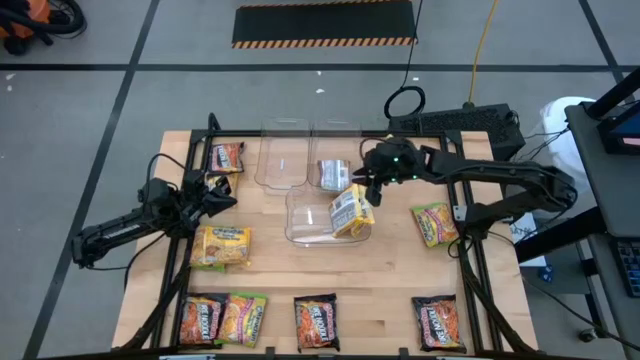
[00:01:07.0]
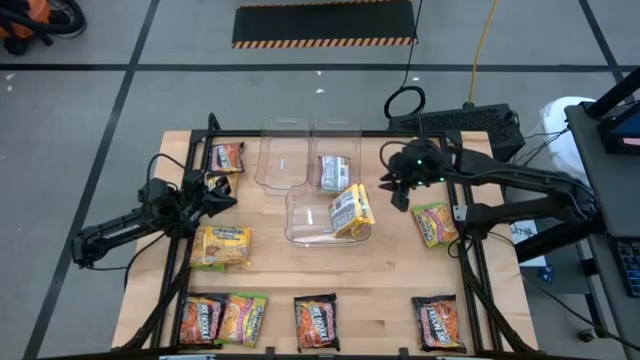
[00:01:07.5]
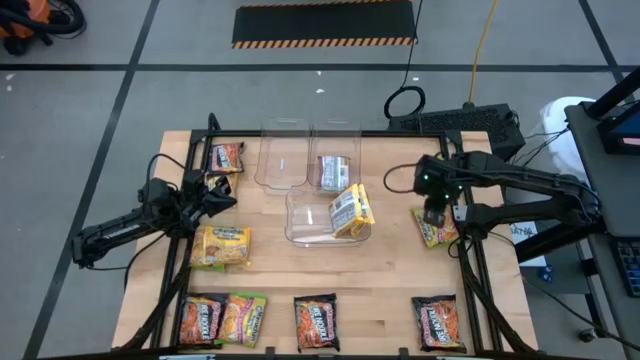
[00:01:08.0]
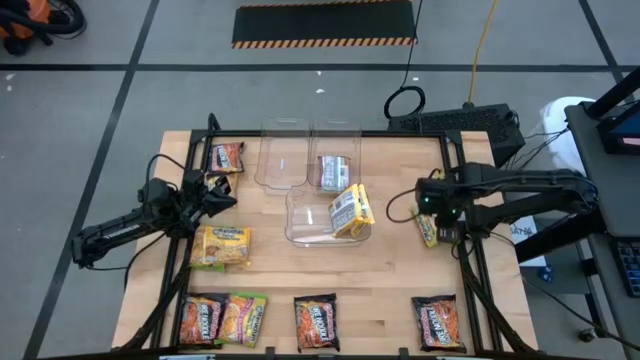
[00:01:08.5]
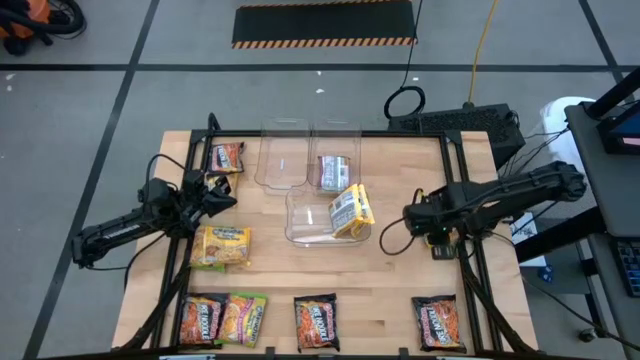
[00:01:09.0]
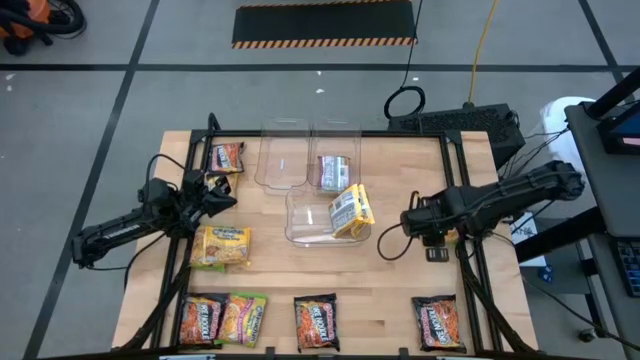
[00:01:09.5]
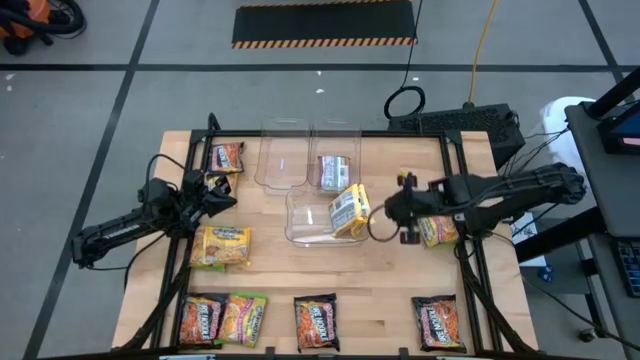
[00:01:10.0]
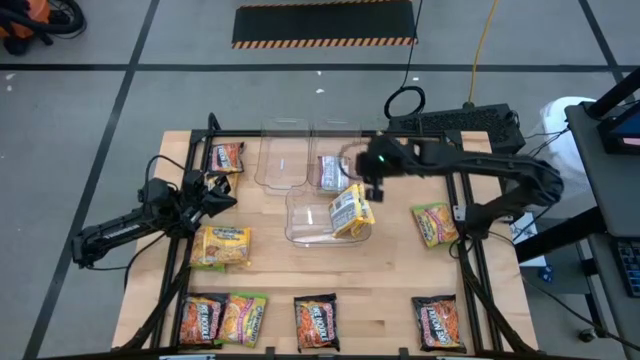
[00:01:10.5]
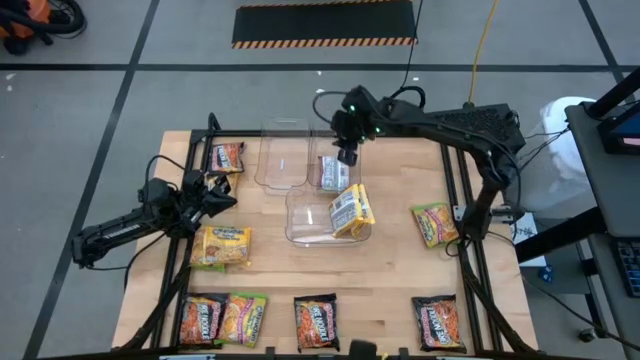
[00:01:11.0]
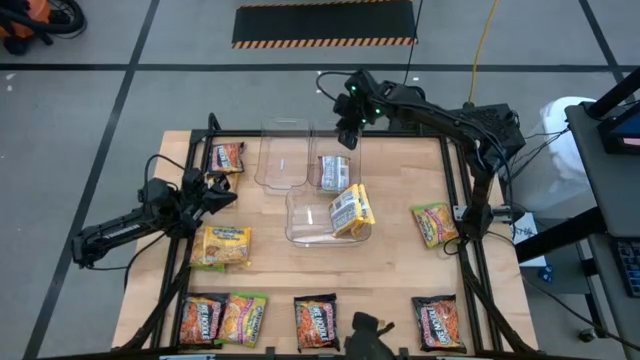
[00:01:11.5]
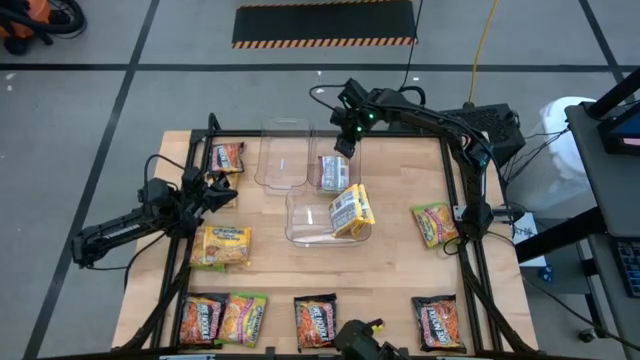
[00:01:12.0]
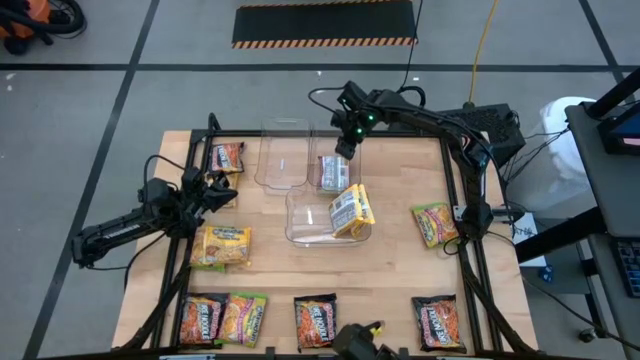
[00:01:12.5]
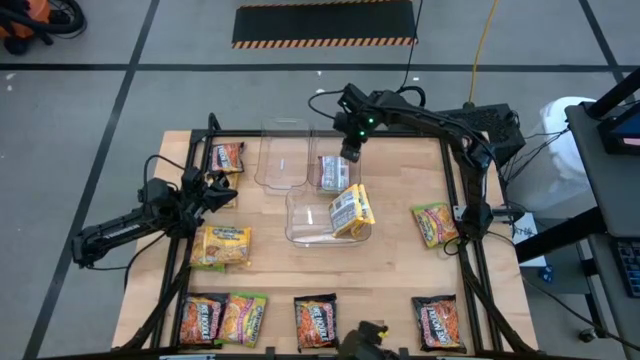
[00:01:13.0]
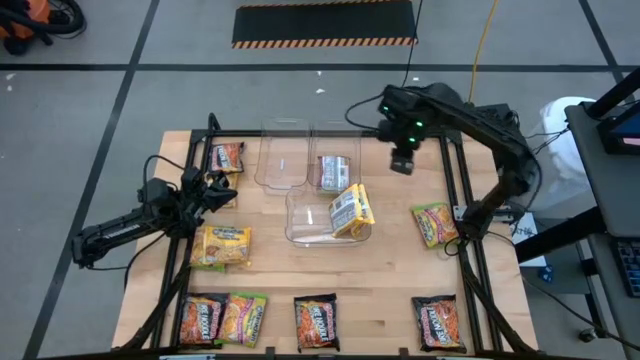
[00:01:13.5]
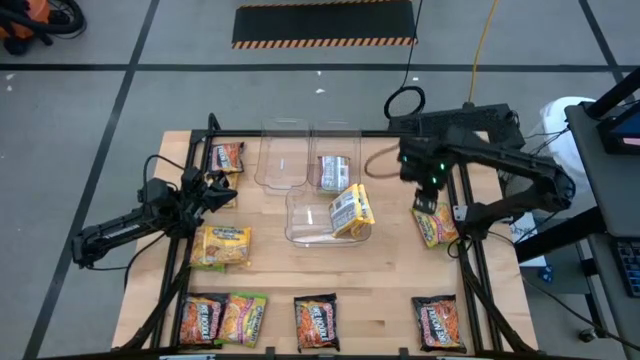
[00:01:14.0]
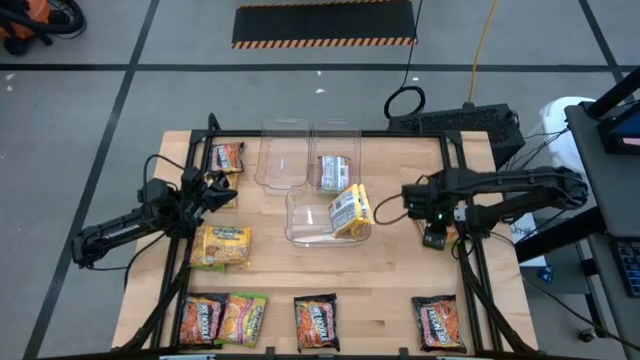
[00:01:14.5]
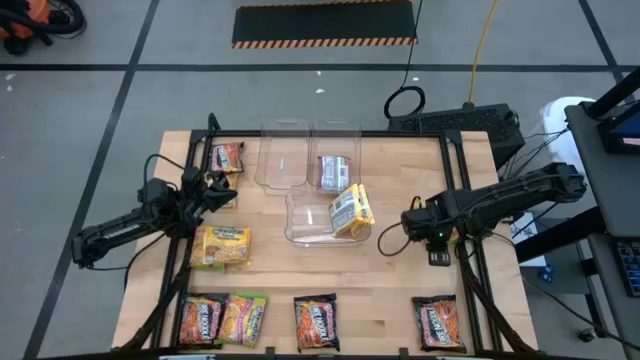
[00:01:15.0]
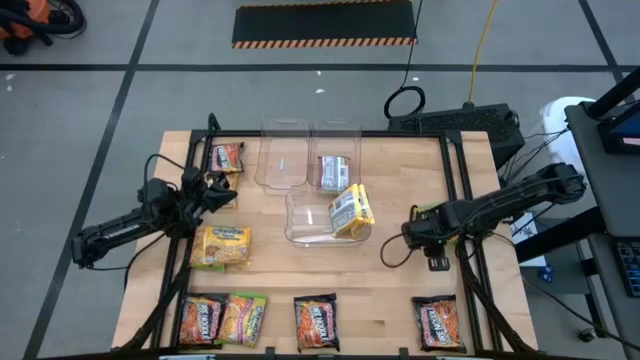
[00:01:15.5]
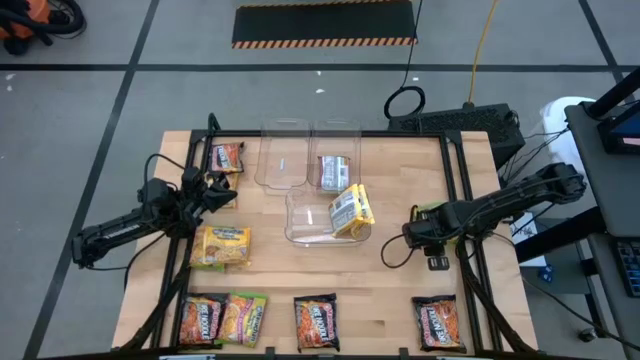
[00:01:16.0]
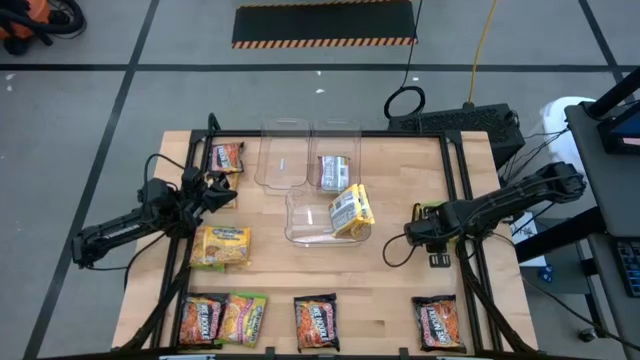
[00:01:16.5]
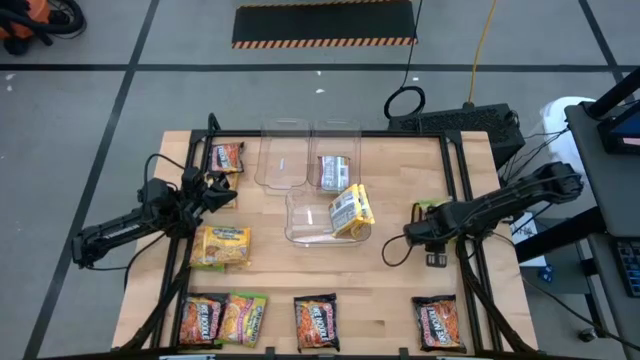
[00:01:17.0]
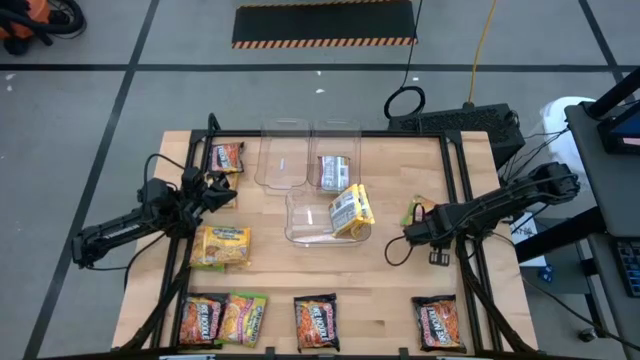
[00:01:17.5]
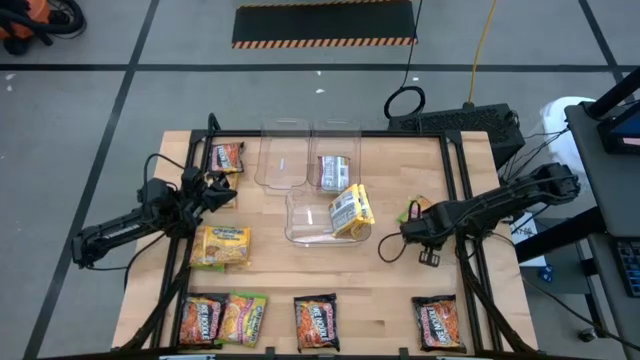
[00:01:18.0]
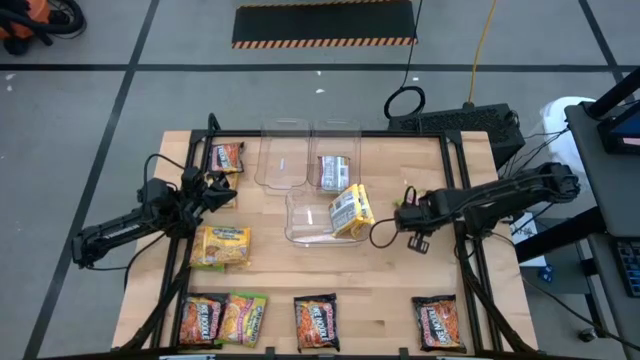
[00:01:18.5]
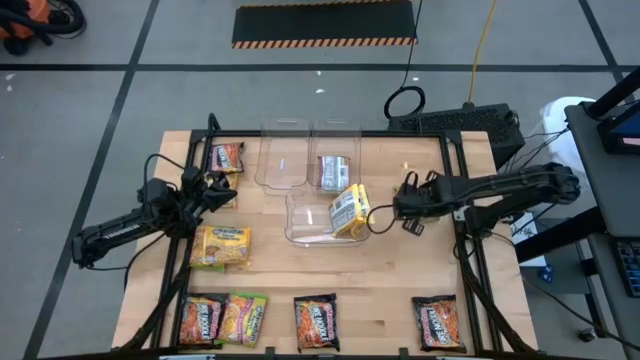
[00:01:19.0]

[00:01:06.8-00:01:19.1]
Task: Sort Maruchan noodles
Put the green noodle pack into the top right transparent bin
